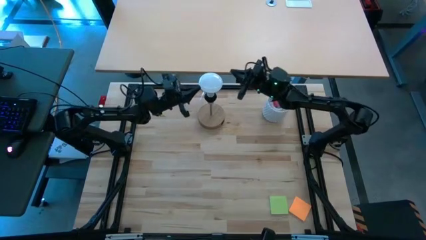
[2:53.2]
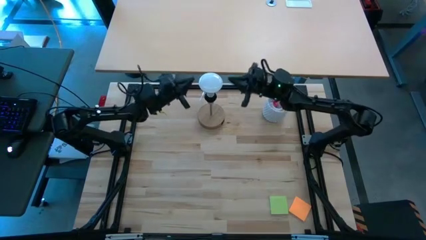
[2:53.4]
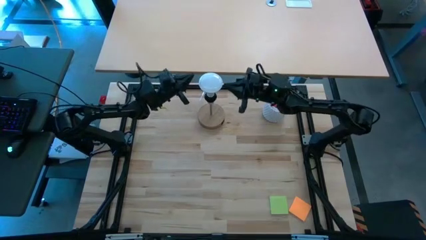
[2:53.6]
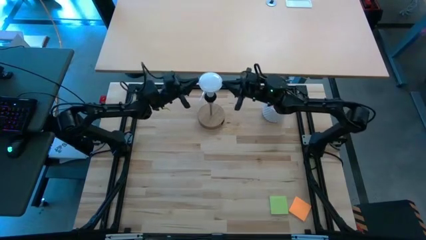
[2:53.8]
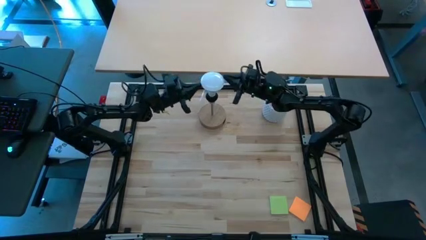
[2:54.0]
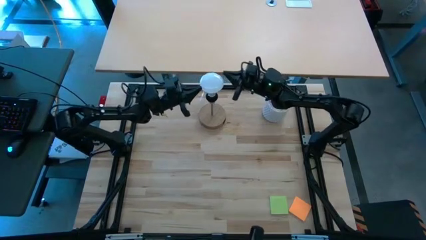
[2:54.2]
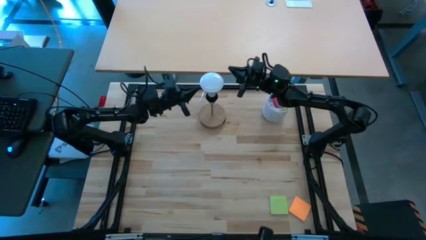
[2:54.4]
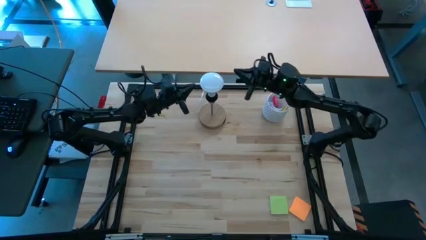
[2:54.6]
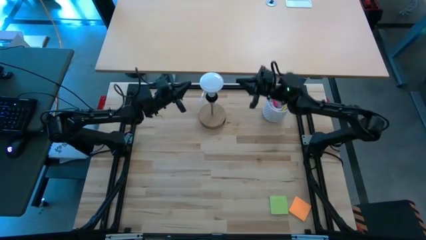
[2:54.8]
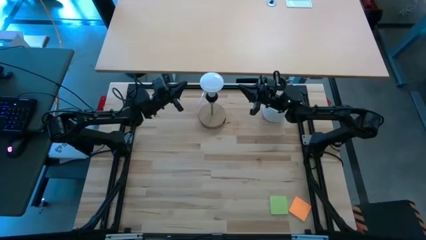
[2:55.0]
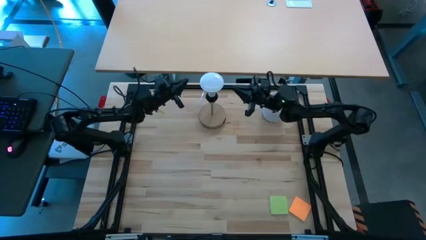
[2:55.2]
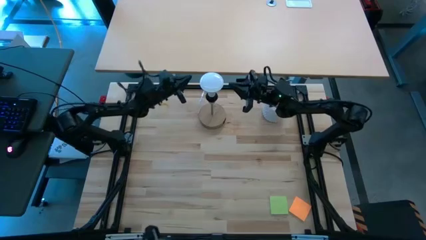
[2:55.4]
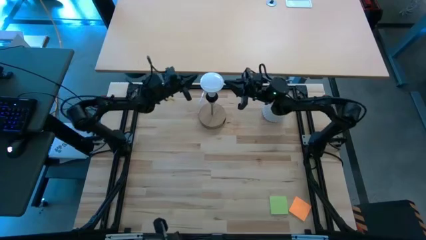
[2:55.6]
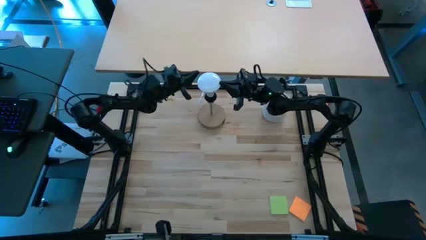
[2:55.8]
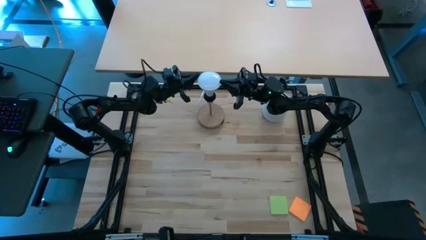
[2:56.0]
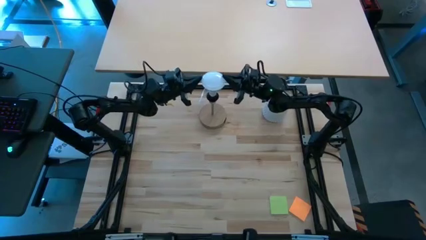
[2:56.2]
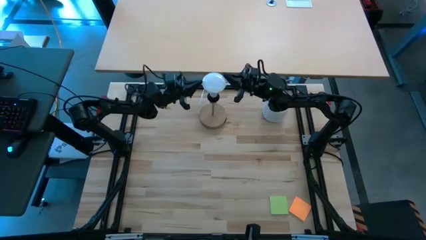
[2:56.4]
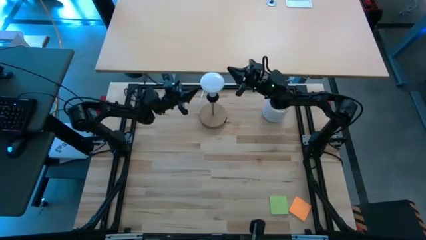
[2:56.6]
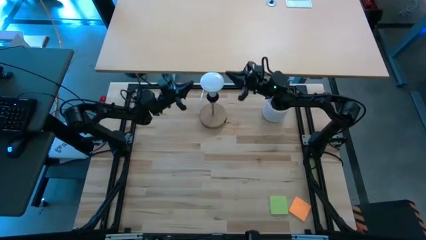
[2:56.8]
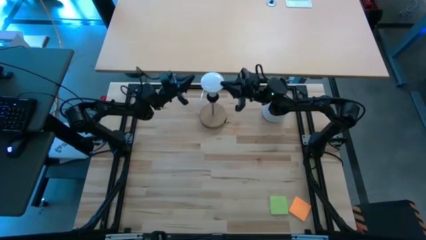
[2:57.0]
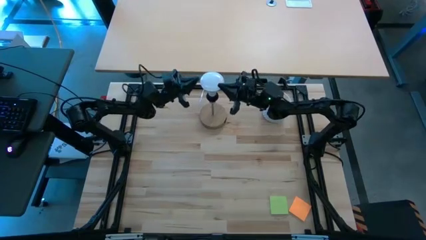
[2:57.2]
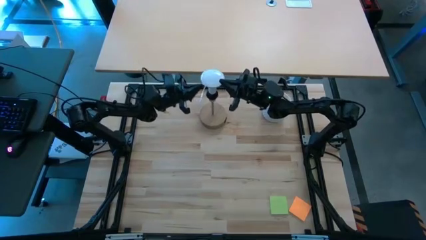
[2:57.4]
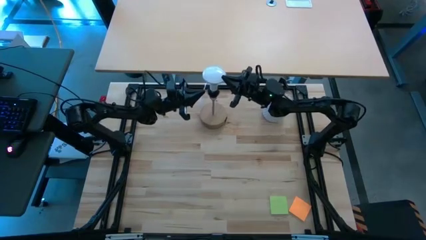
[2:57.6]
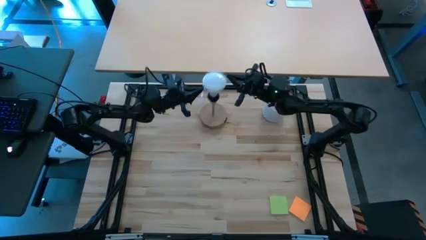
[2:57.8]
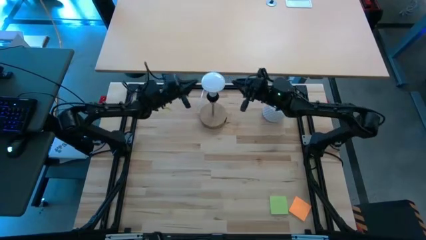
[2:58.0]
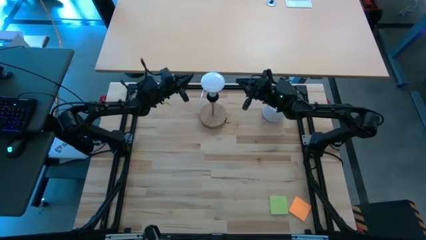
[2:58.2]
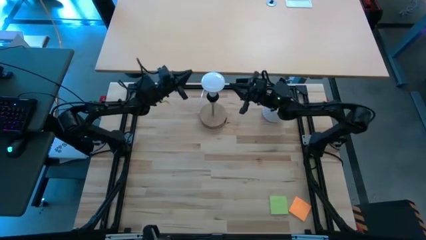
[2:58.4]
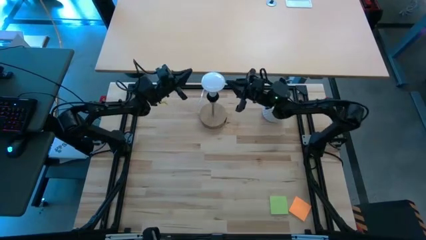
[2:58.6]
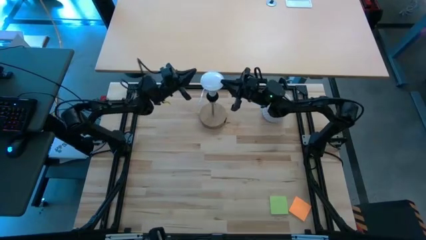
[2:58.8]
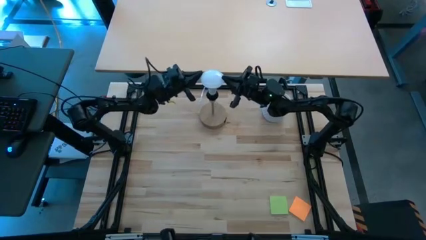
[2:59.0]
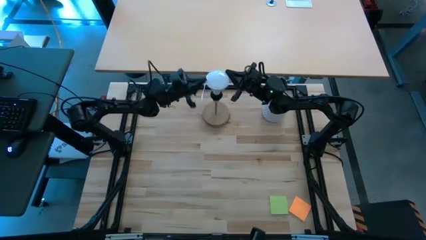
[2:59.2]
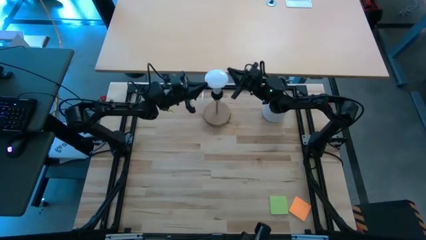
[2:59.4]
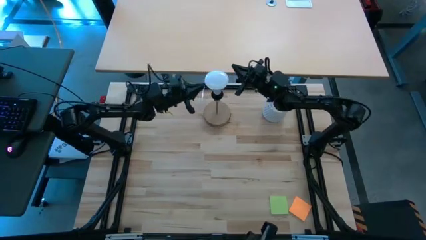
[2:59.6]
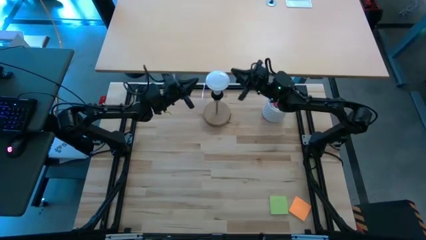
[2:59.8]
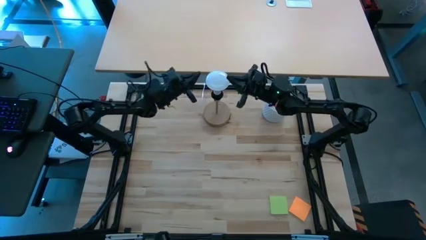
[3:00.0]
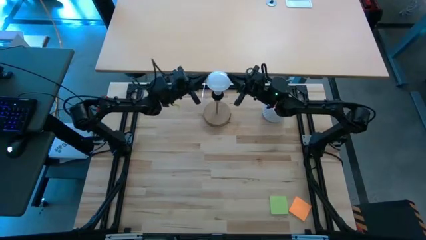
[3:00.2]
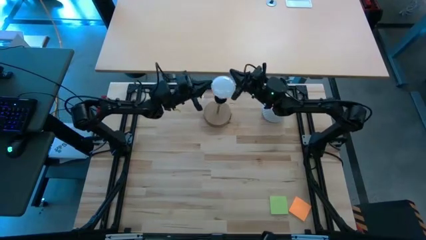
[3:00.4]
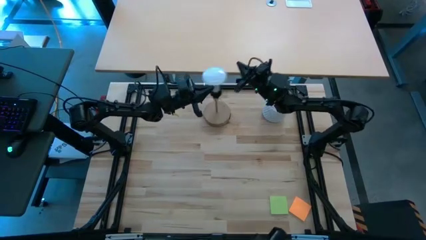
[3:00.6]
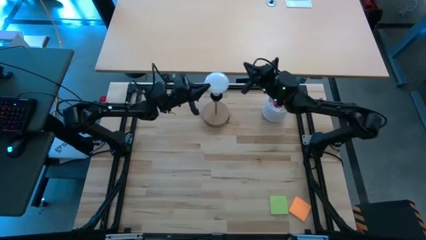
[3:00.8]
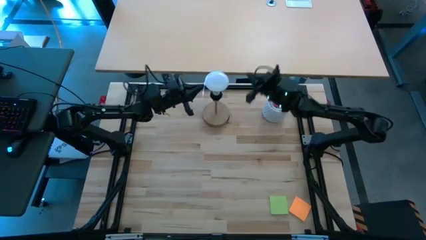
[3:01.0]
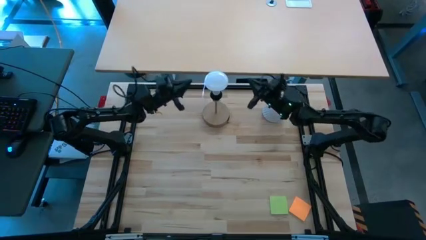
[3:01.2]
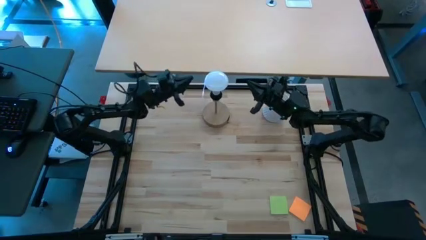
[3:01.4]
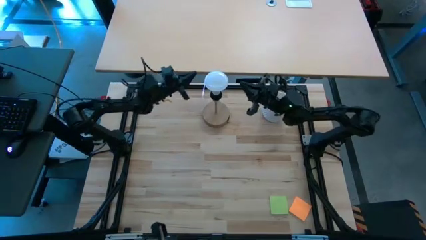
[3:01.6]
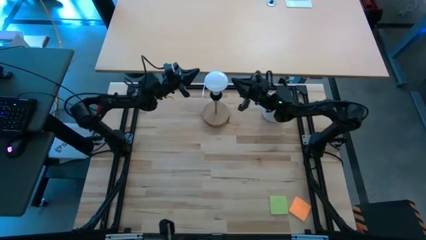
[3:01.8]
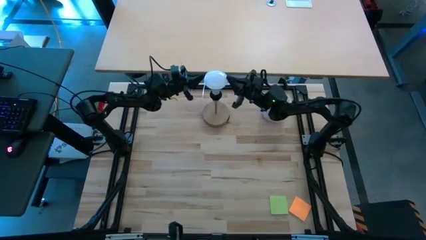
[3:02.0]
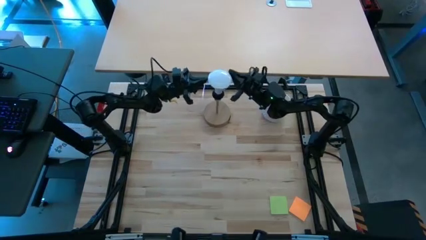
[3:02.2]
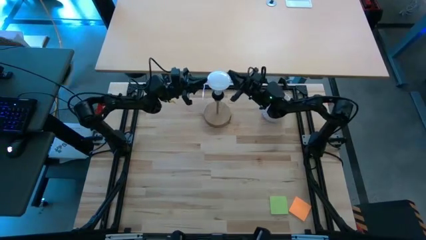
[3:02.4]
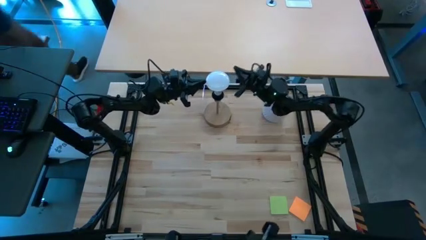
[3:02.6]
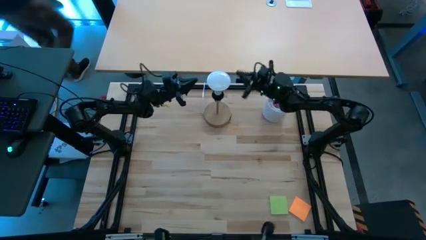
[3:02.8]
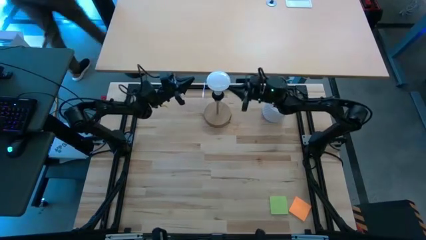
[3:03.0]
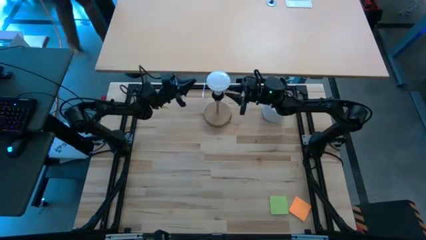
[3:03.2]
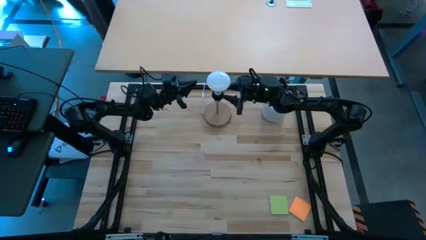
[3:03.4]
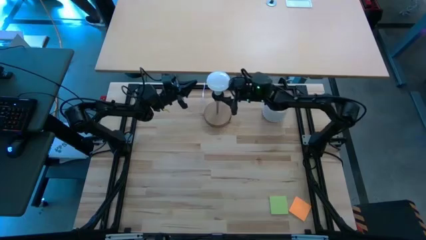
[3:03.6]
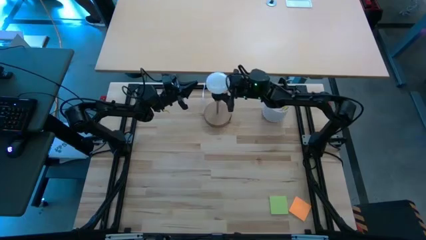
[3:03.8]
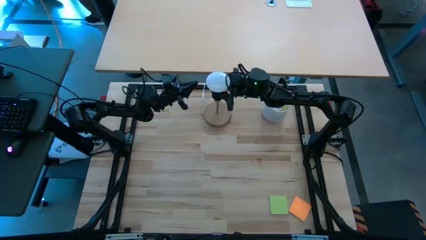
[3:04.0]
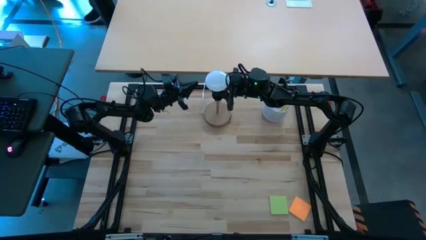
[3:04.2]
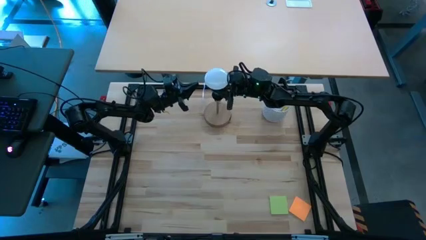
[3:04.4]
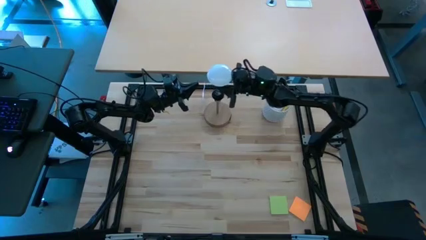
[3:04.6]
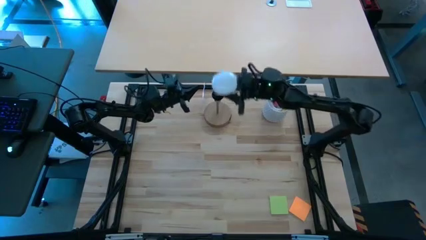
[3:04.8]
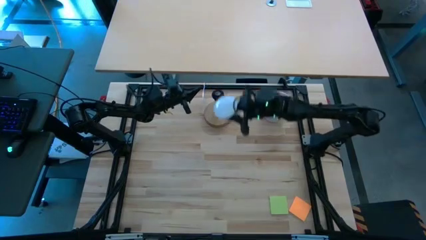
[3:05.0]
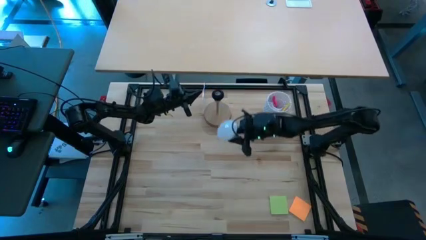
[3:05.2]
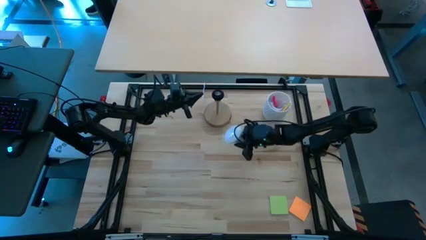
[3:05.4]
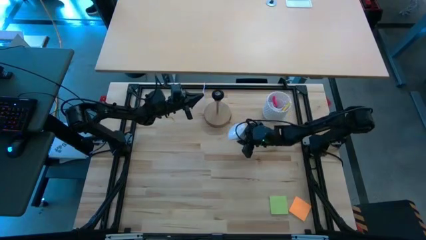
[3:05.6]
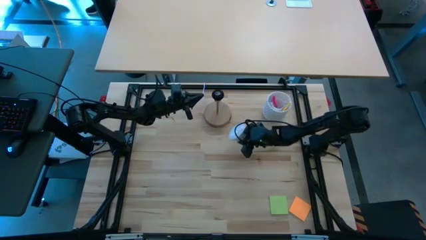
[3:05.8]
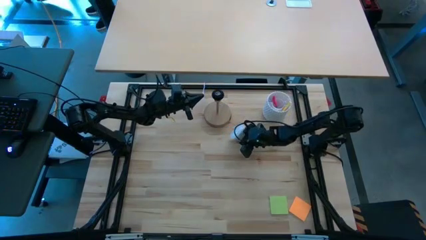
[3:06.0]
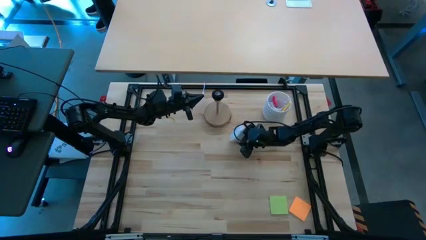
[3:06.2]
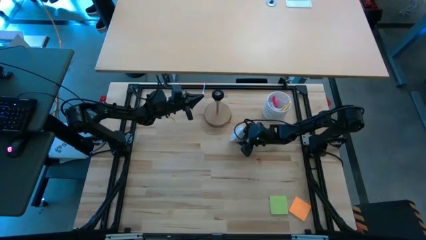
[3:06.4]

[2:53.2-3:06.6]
Task: Screw lightbulb
Remove the white lightbulb from the desk lamp

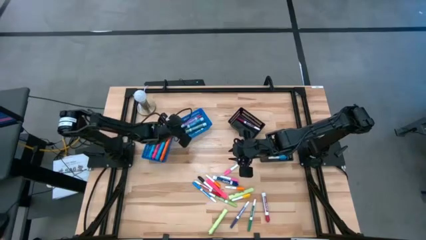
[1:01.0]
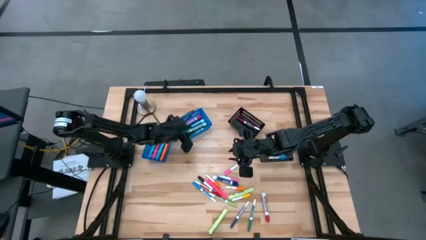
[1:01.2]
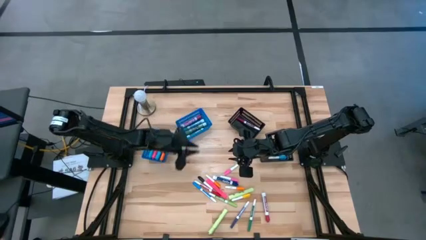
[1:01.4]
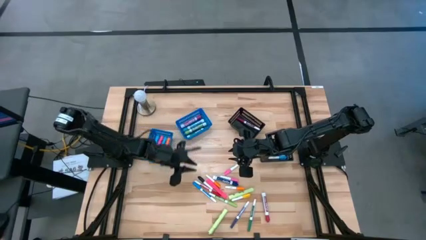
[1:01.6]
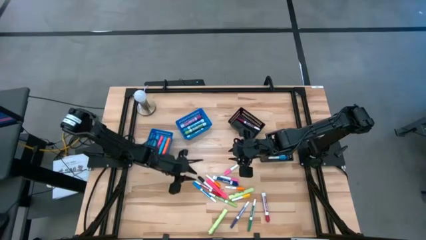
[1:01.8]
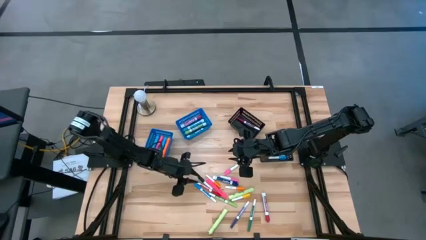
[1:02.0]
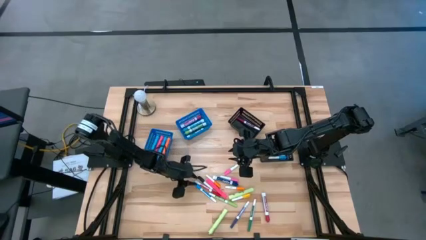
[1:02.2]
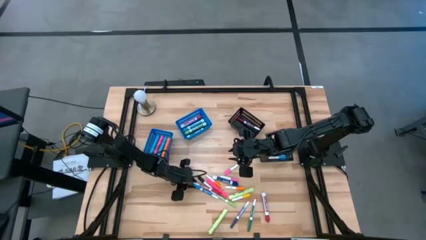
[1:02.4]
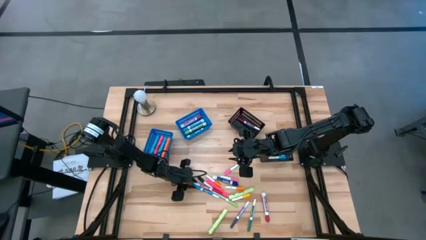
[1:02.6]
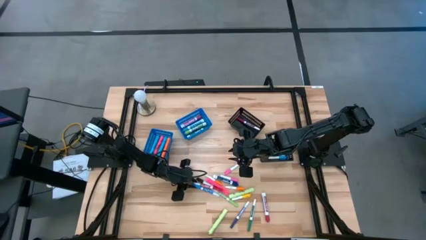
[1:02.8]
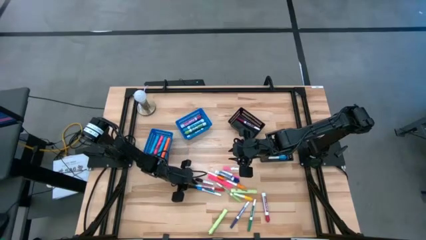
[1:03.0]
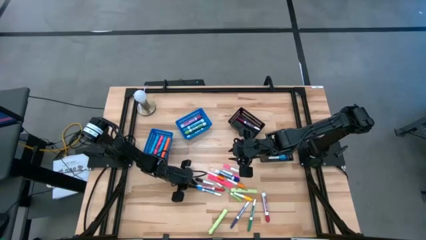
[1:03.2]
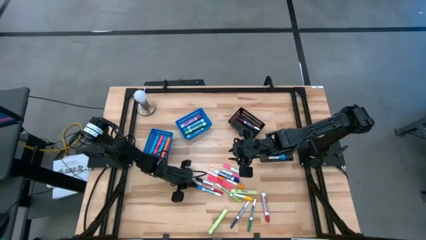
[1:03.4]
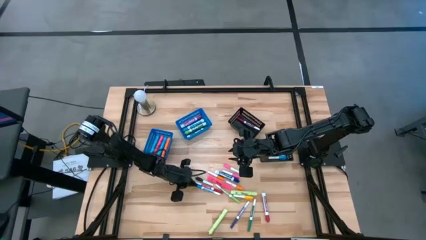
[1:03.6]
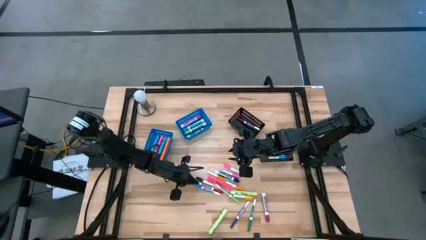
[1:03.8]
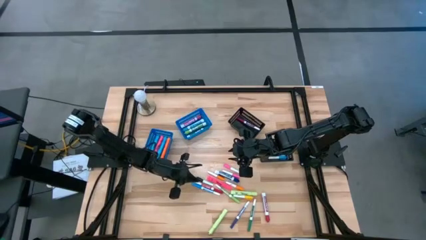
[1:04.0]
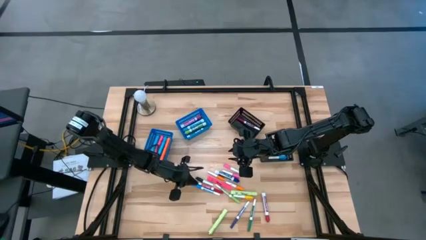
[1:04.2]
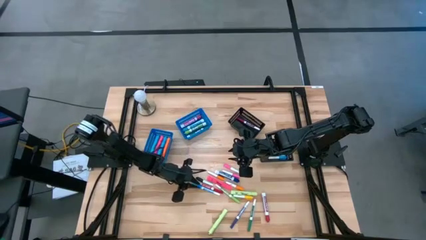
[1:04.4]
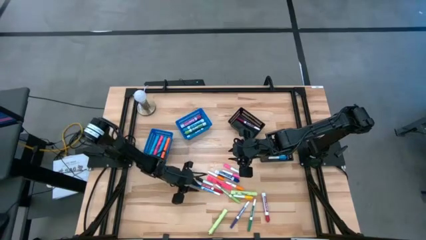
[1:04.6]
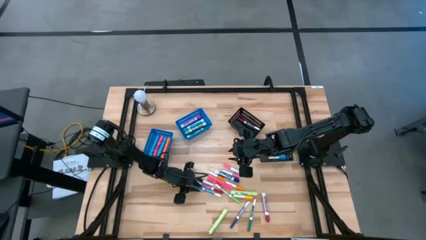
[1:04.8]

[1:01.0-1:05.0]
Task: Pick & Place Markers
Put the light blue marker pen into the top black bin
